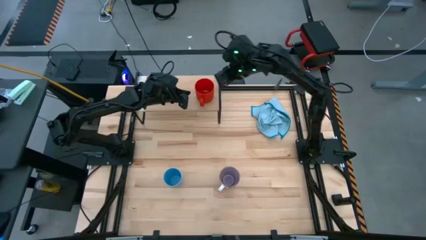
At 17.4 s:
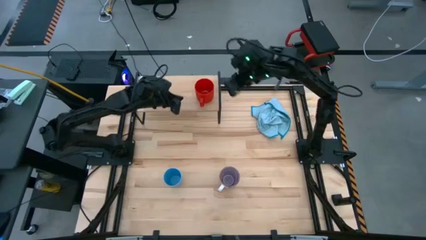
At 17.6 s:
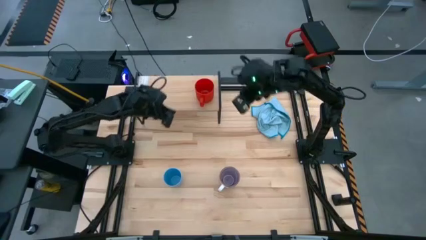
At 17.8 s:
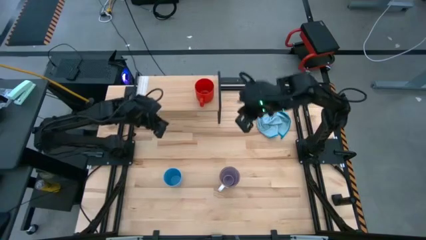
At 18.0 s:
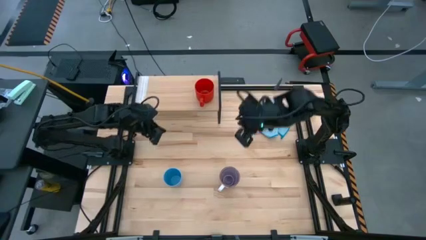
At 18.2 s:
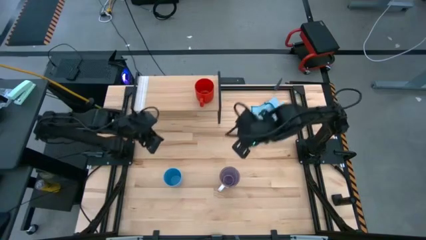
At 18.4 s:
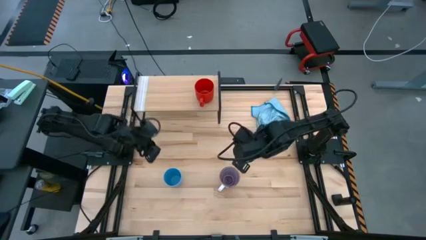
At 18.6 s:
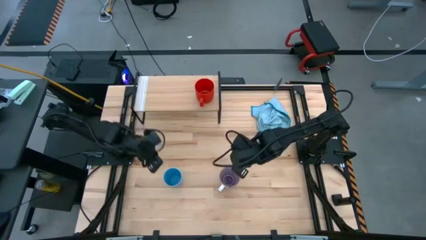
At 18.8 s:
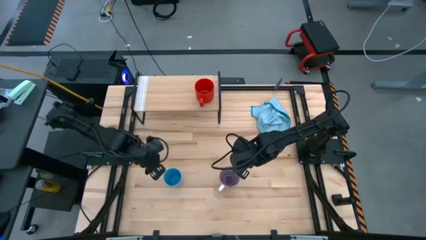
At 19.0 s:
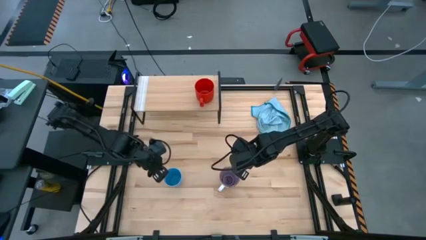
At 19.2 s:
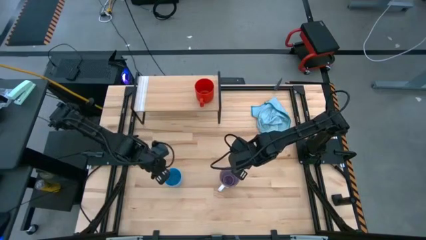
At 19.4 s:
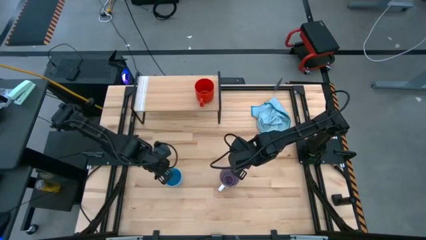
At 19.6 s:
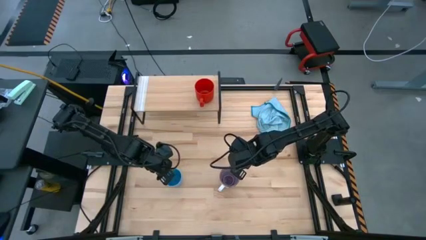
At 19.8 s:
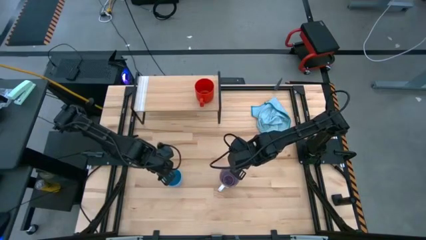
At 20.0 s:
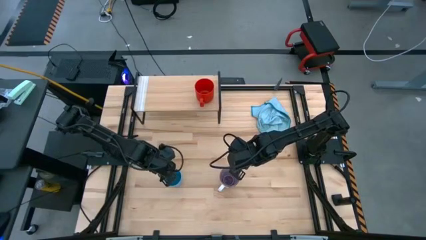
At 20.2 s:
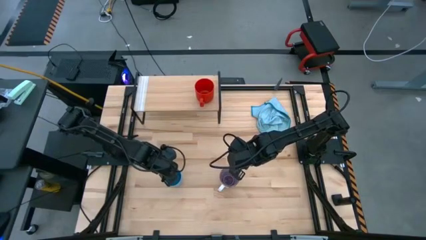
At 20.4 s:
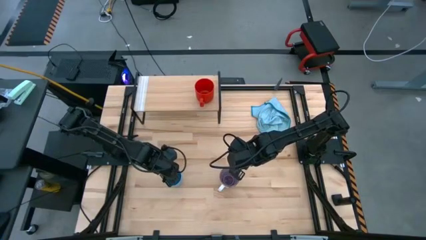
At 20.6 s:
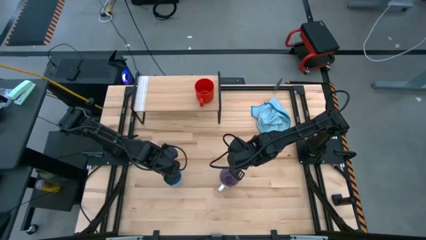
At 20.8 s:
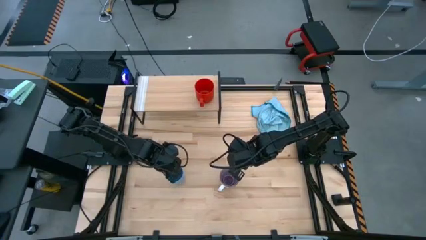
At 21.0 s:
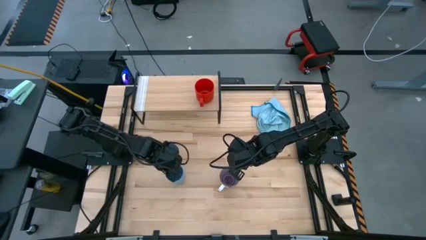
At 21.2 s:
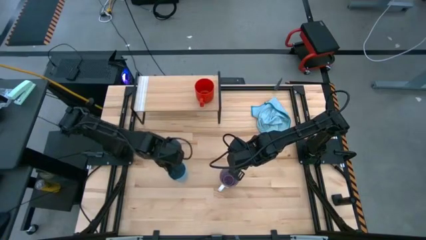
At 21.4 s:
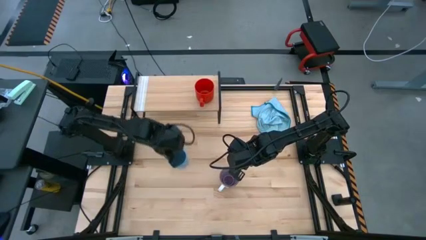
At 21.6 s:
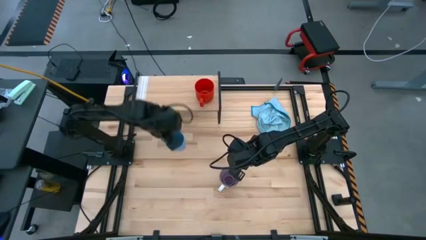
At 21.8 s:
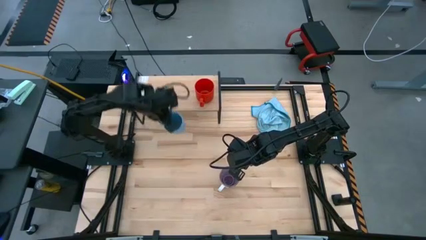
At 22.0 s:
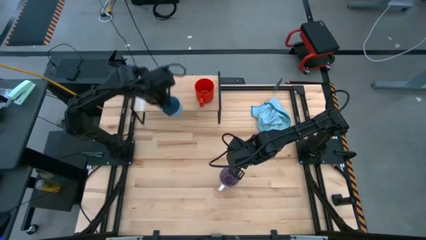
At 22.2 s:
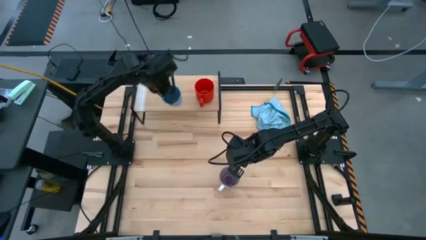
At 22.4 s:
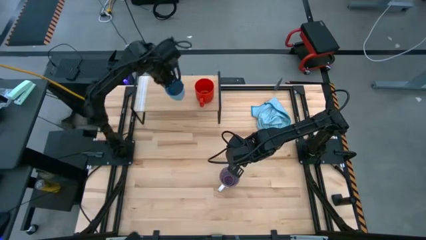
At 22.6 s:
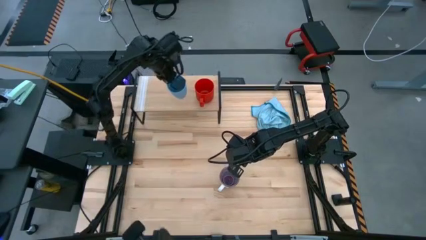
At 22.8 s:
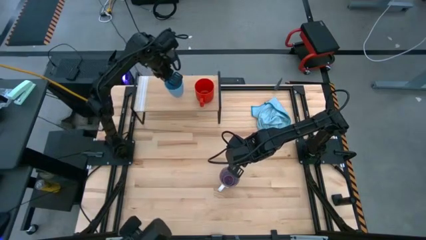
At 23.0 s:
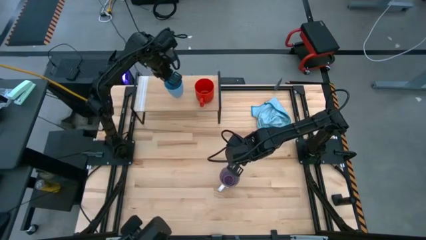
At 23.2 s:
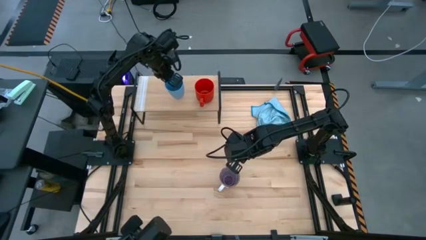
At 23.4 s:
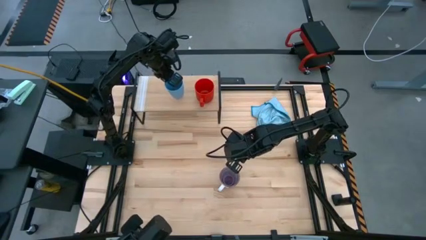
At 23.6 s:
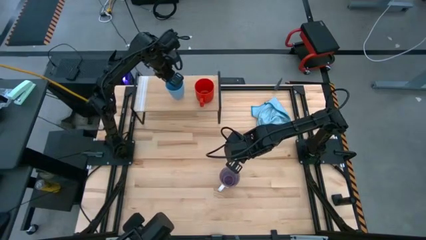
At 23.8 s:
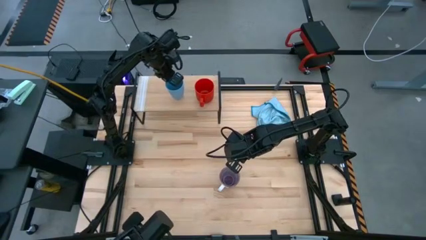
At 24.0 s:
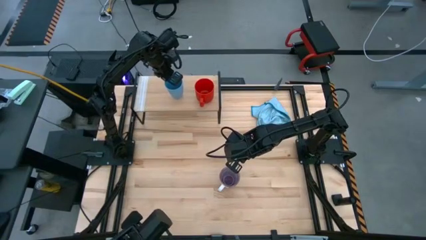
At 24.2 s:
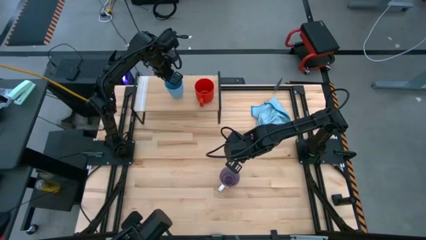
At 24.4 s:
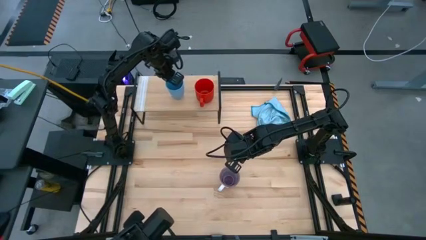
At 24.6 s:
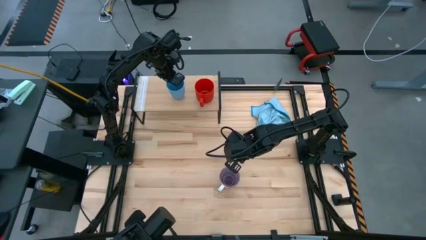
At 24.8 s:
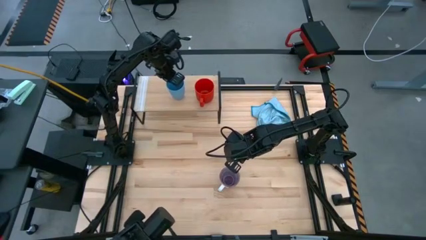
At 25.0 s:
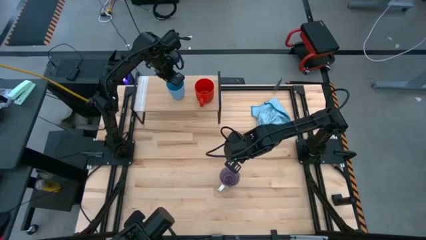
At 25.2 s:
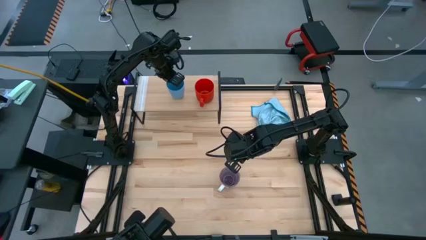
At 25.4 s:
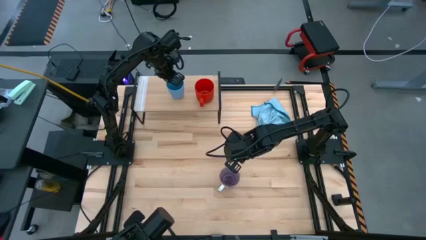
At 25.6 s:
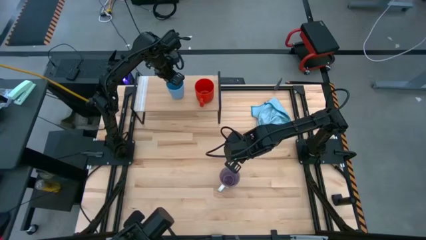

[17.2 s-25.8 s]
Task: Stack small to large cups/mugs on shelf
Put the blue cup on the shelf

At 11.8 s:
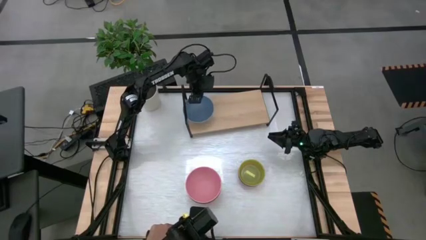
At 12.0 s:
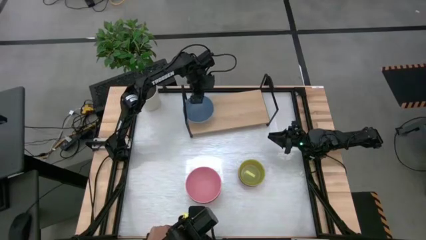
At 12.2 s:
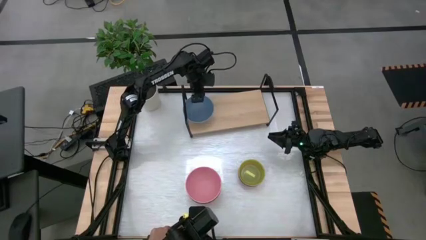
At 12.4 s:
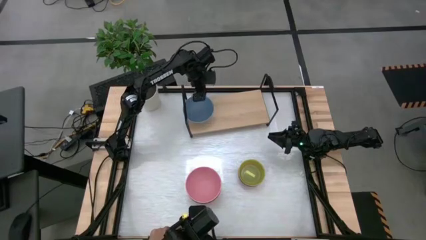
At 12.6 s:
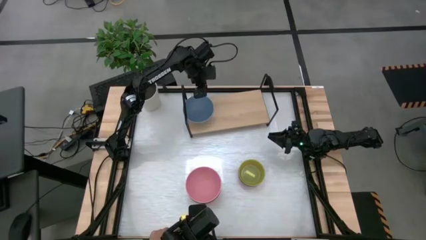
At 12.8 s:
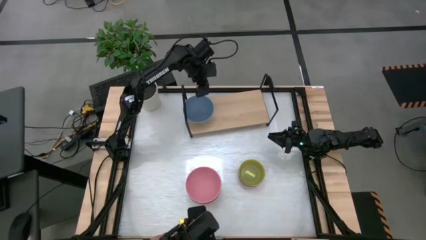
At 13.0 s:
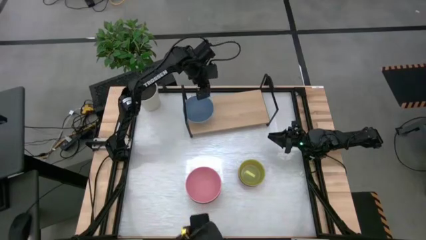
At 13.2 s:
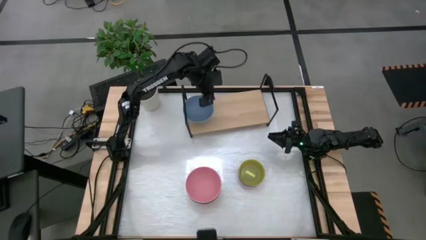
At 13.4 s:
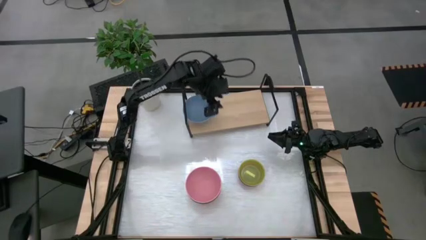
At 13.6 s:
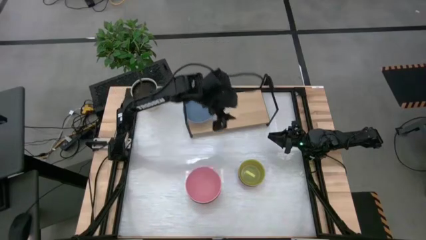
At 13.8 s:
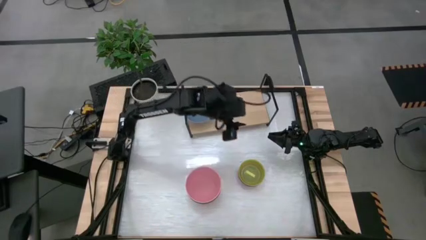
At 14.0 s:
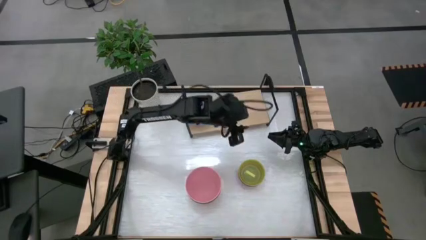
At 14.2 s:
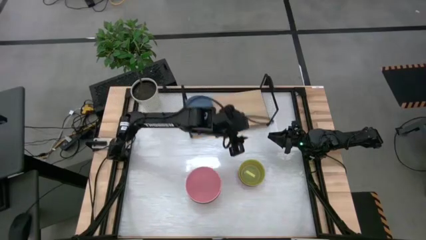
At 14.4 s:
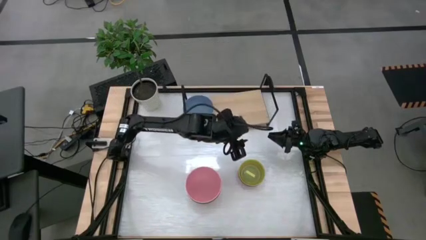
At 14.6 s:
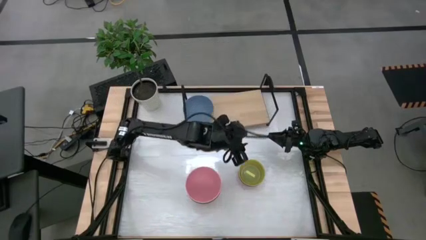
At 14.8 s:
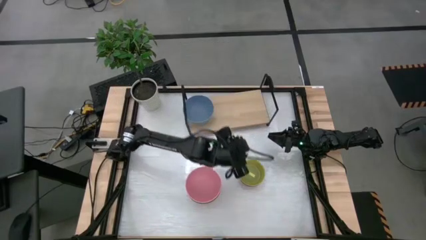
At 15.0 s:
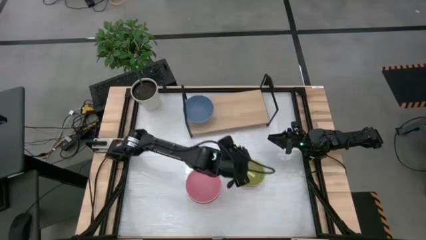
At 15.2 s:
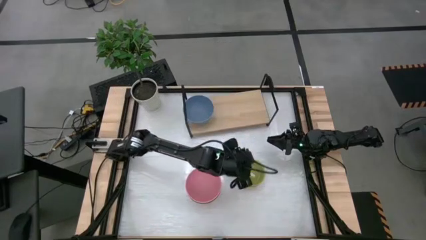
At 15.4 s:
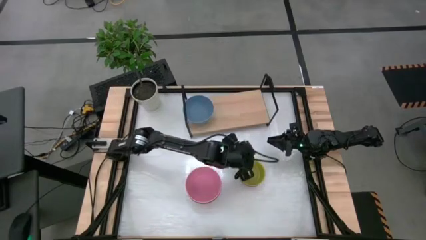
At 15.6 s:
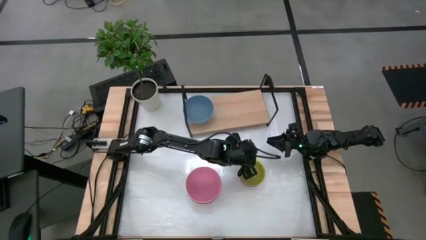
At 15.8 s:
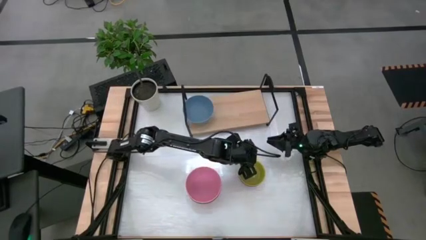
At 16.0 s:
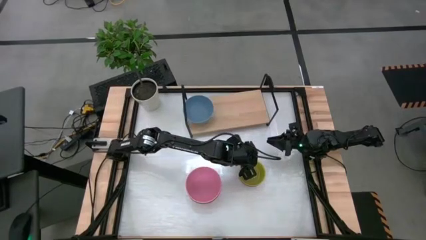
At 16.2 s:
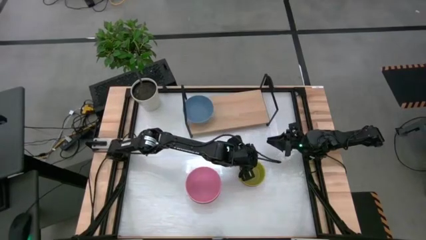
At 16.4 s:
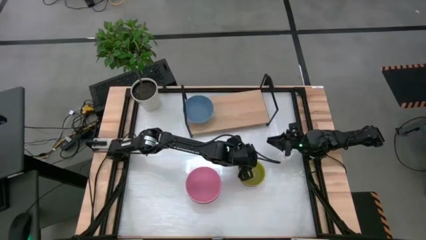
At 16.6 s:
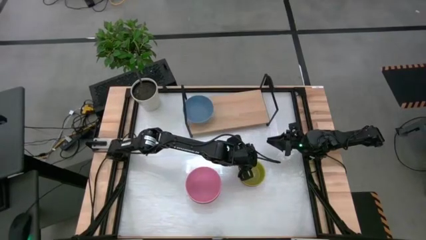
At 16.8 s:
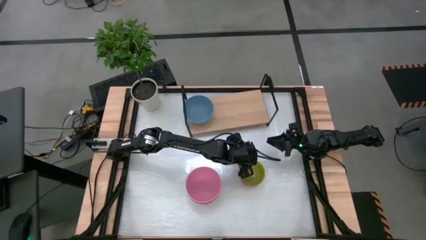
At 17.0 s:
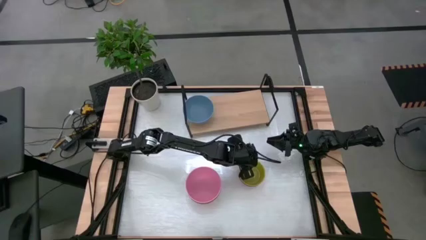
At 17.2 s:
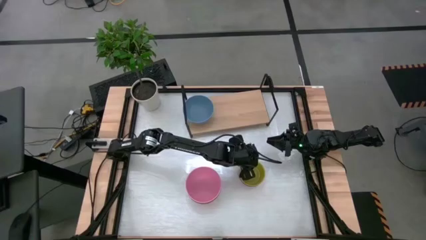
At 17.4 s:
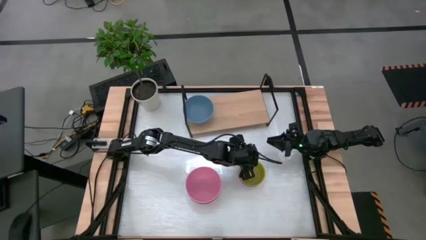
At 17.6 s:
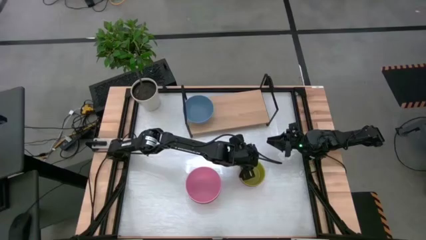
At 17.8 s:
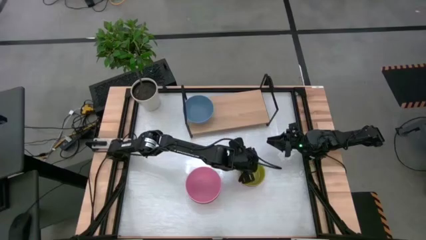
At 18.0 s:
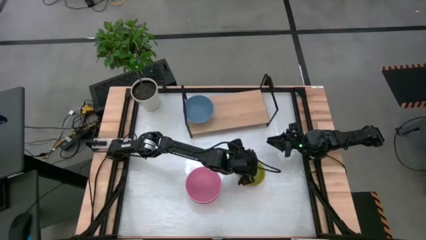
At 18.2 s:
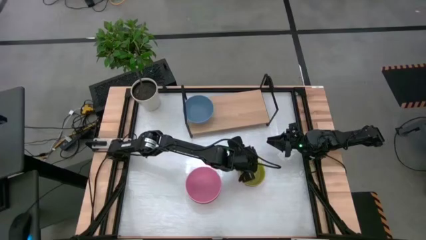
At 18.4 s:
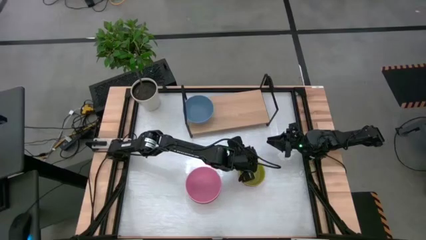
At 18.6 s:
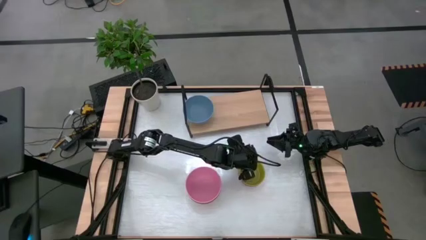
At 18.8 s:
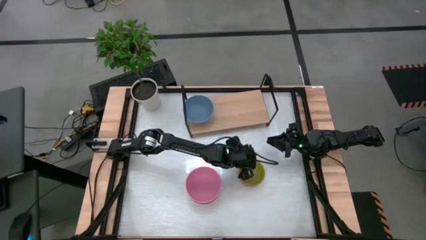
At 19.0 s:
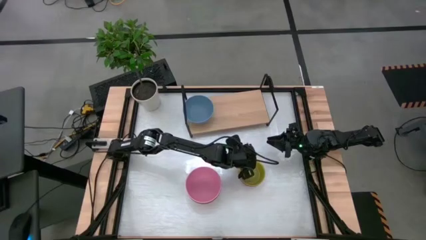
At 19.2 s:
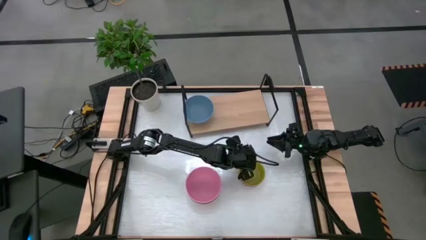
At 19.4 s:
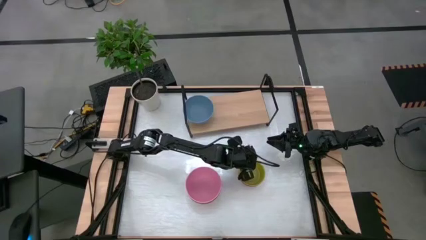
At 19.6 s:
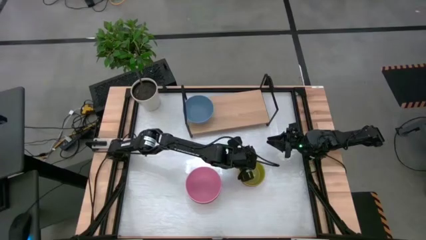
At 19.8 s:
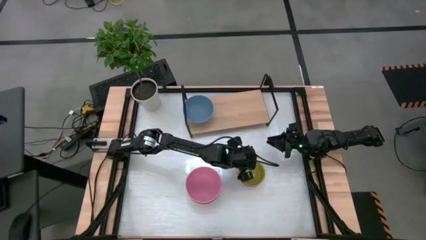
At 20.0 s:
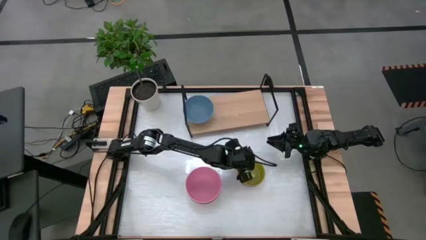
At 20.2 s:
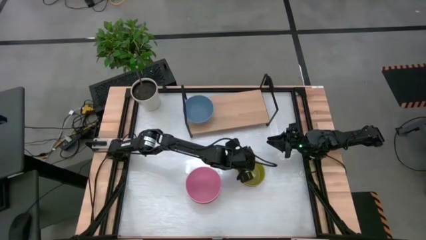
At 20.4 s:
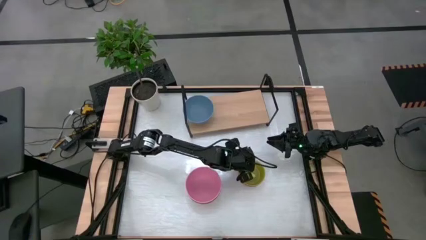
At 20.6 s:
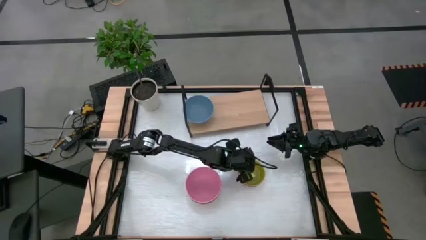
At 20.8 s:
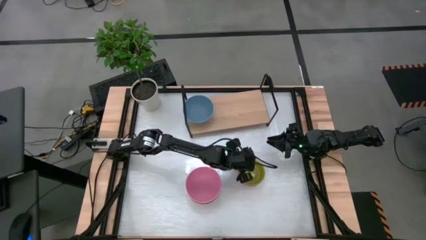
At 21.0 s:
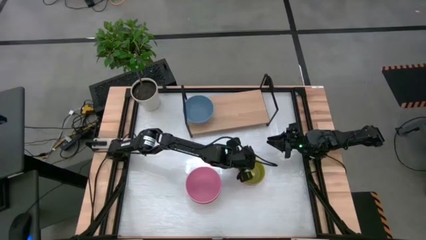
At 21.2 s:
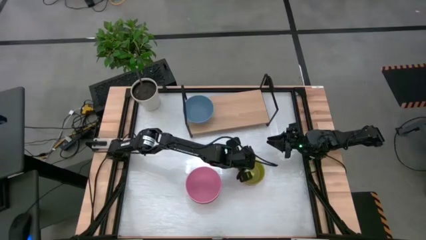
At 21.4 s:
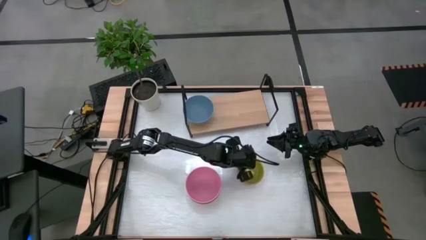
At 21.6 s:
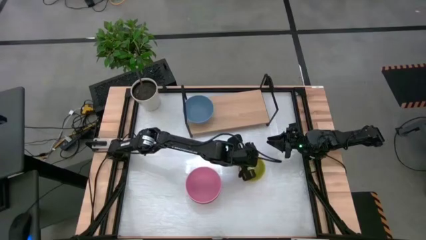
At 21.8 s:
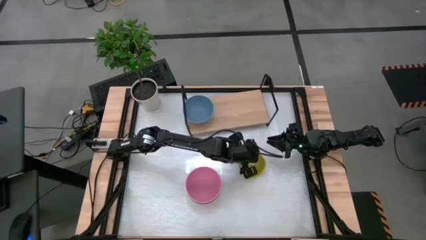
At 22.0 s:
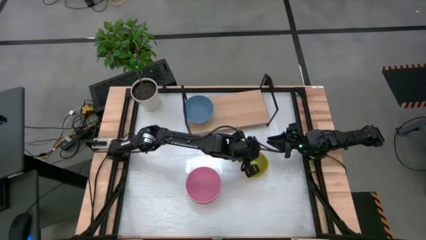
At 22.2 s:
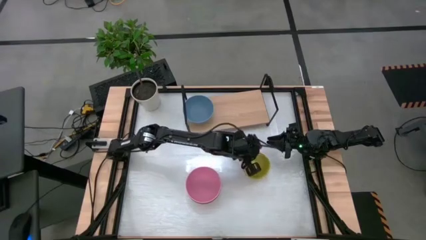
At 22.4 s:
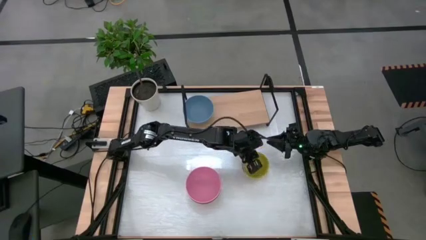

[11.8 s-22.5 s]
Task: Place and stack bowls onto a shelf
Put the small yellow bowl on the shelf
